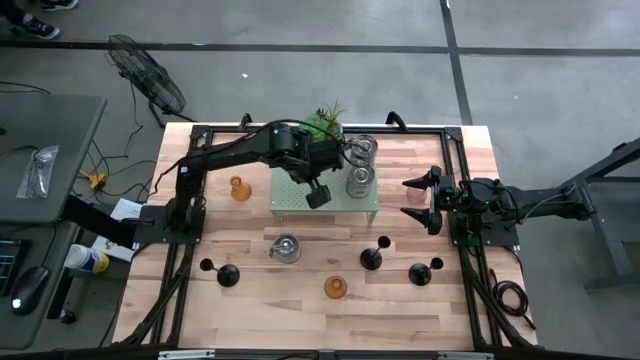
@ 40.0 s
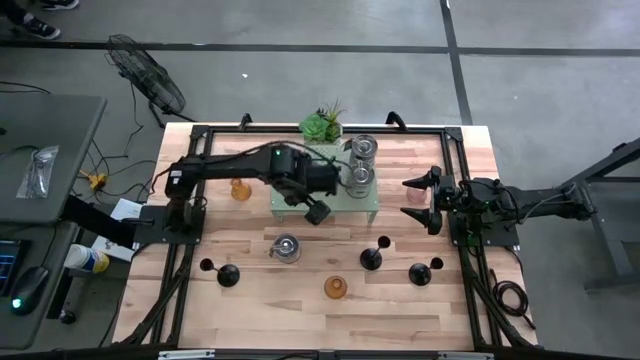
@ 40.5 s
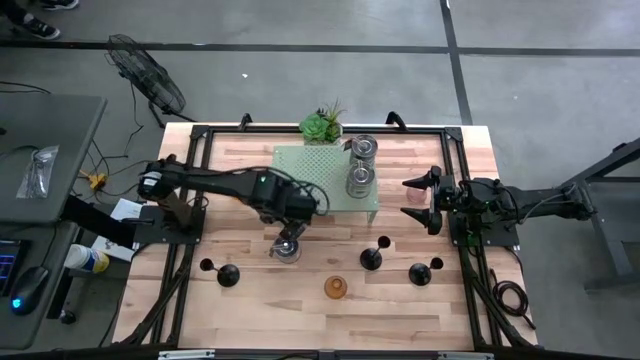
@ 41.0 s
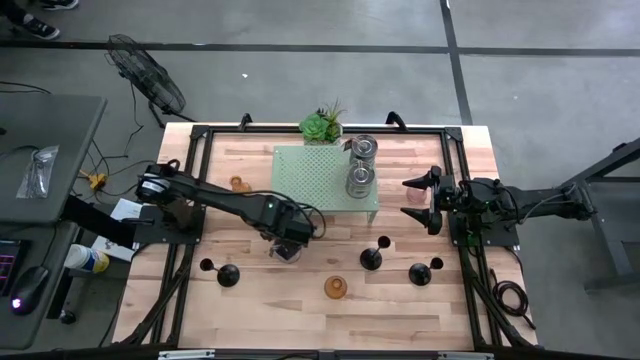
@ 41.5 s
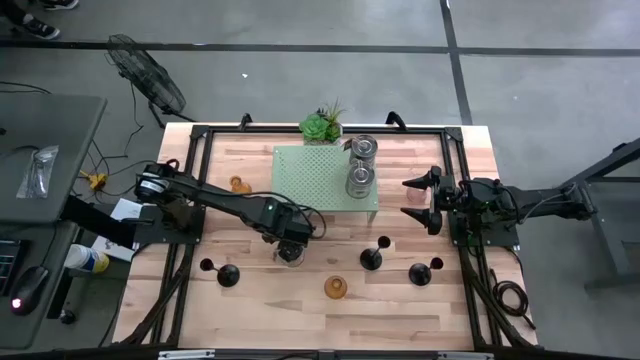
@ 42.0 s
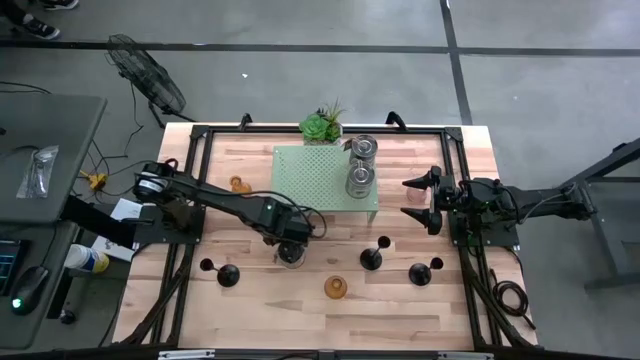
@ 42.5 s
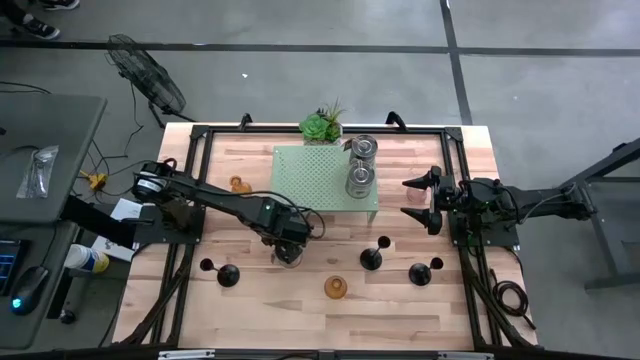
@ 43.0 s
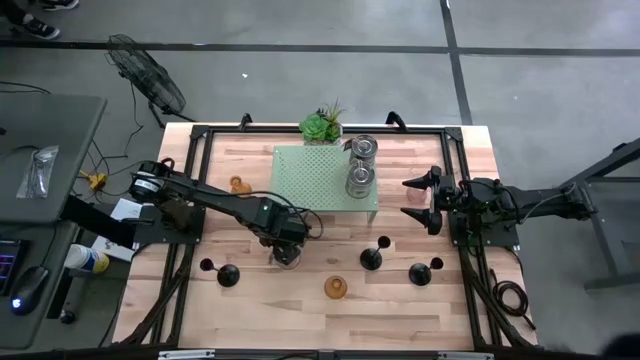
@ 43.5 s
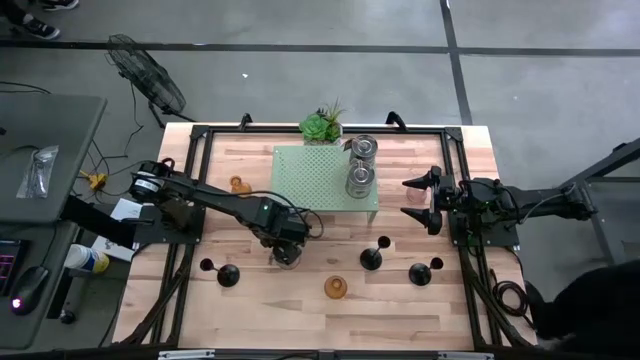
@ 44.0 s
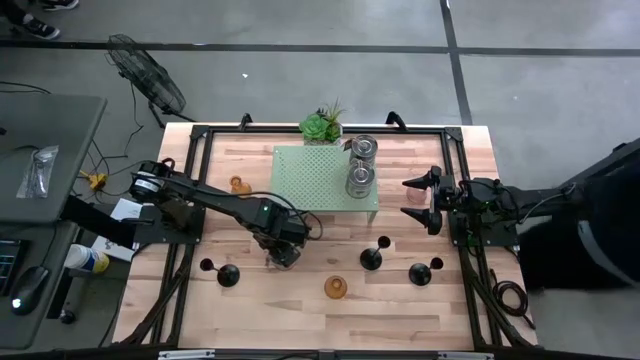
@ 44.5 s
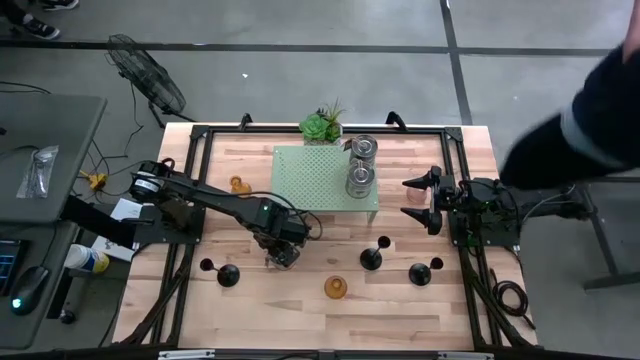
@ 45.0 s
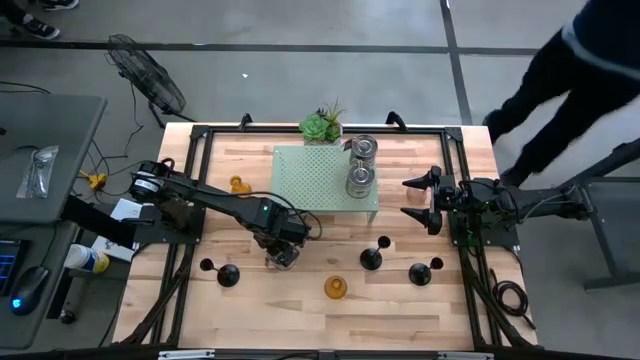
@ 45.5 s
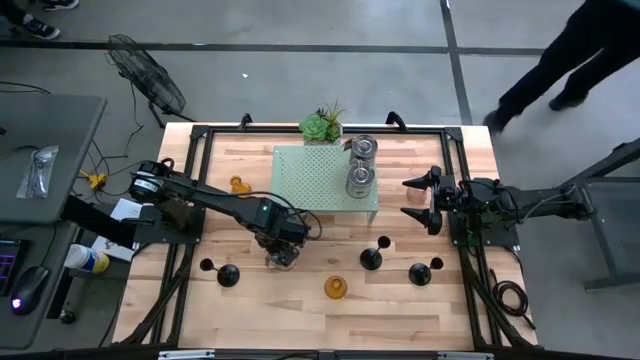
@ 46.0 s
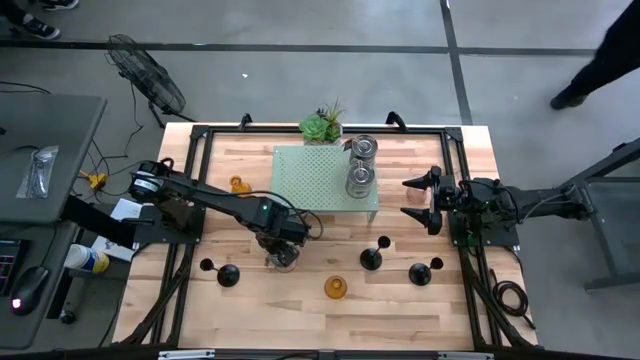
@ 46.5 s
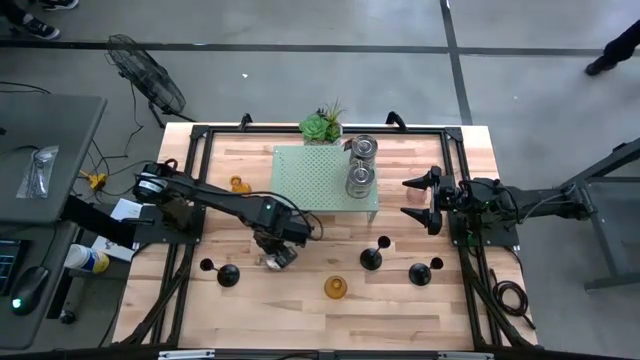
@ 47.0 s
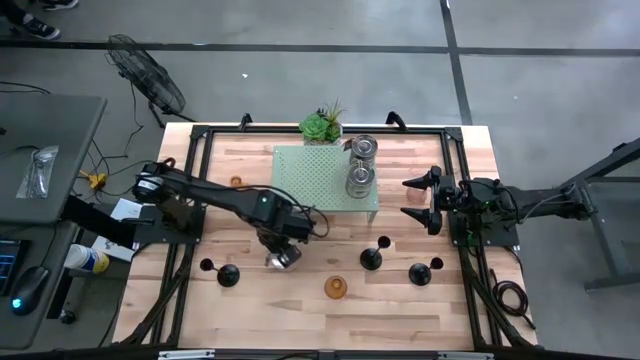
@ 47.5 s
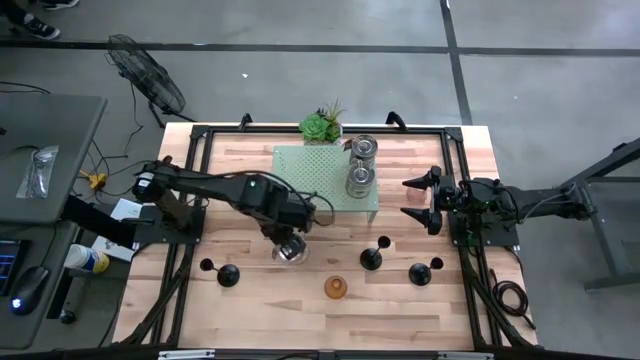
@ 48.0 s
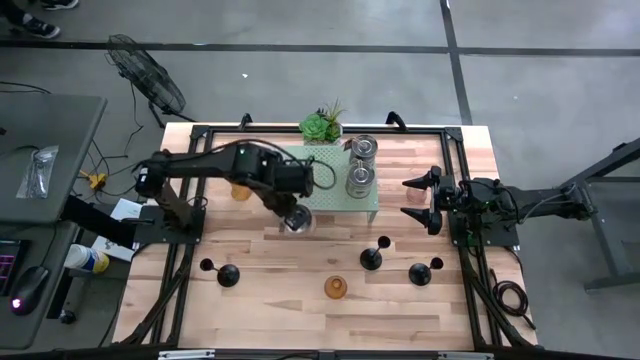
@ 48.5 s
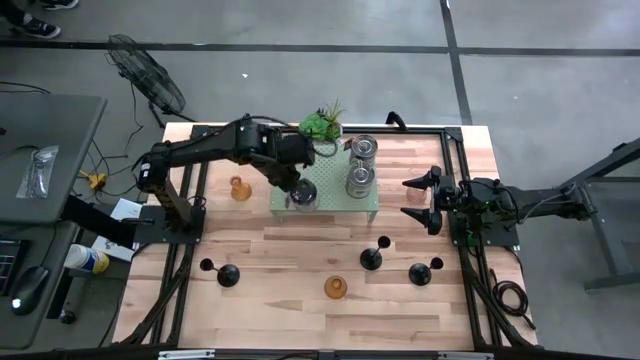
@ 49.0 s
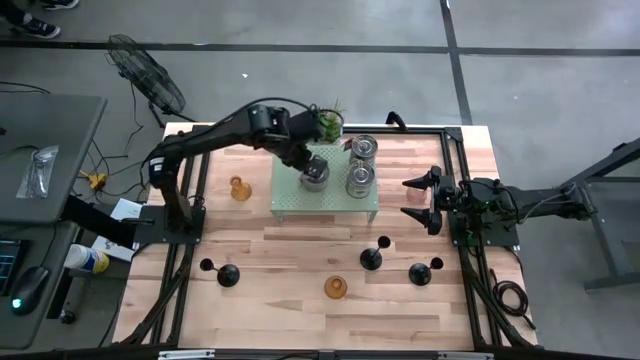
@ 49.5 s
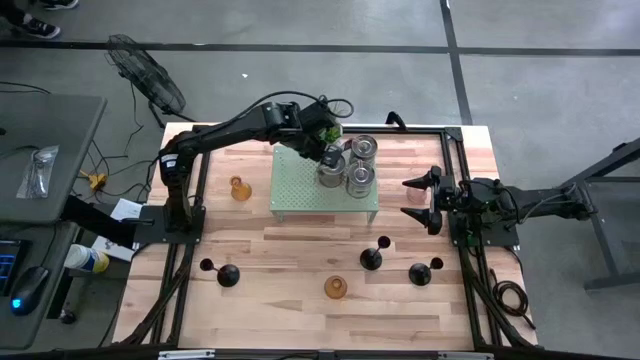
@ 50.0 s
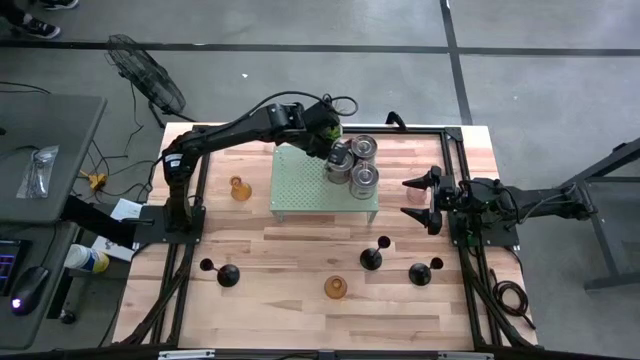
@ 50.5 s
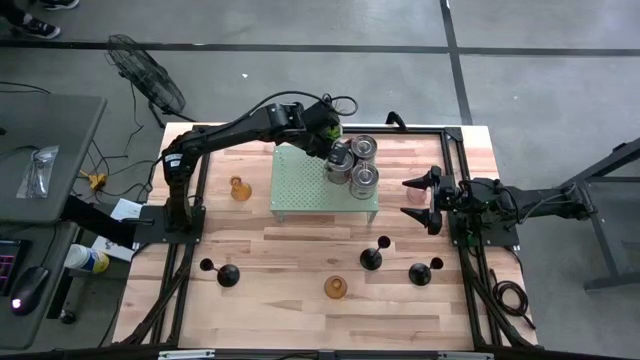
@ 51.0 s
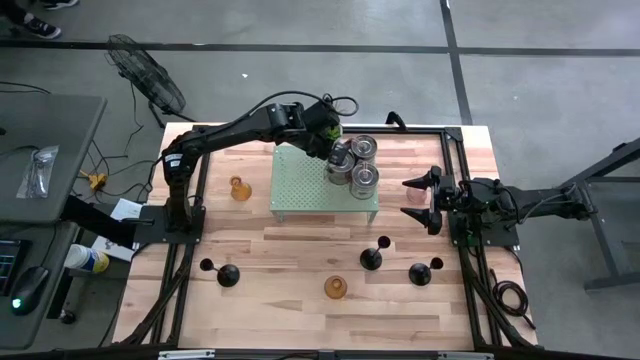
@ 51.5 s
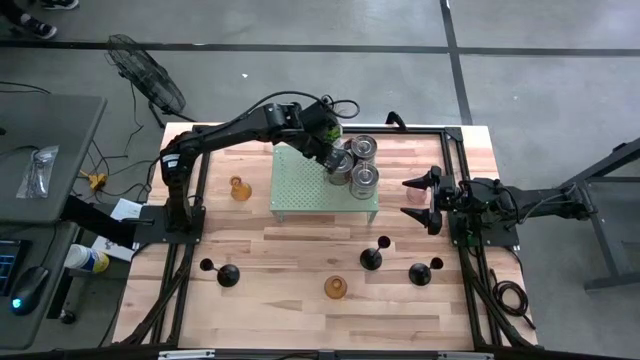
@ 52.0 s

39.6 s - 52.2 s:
Task: Pick & Place candle stick holders
Put the silver scented candle on the shelf

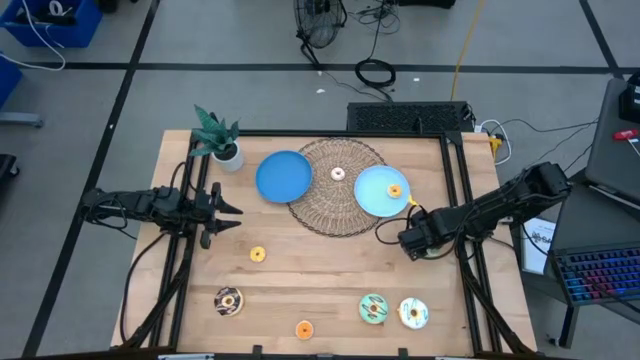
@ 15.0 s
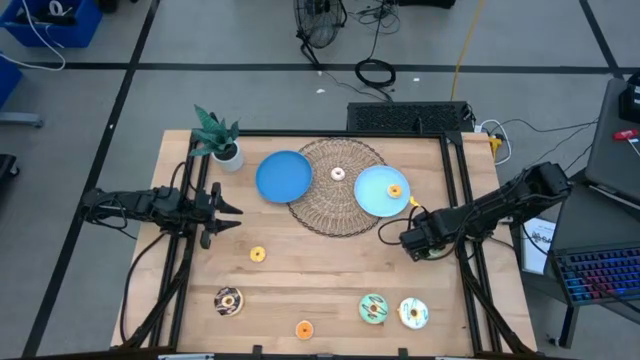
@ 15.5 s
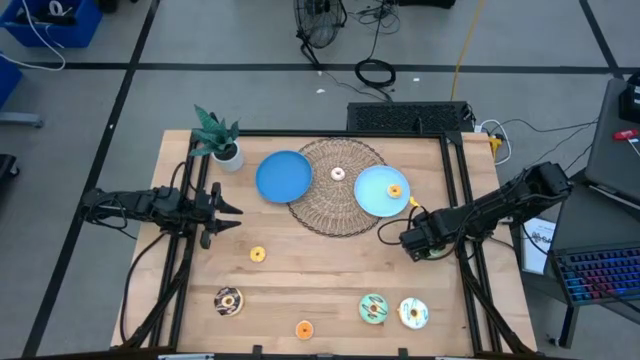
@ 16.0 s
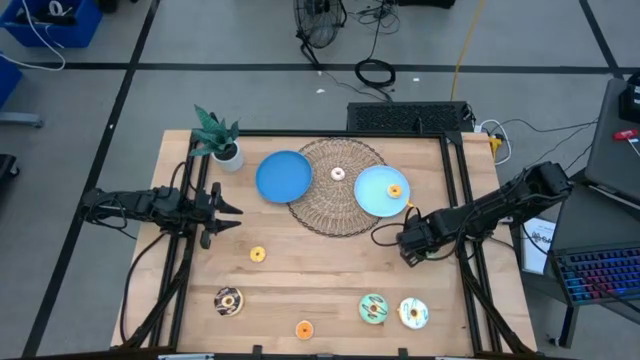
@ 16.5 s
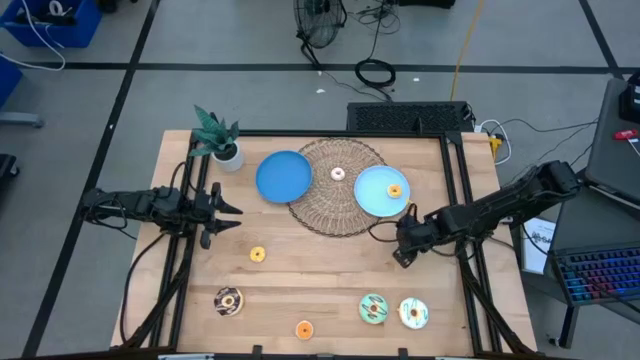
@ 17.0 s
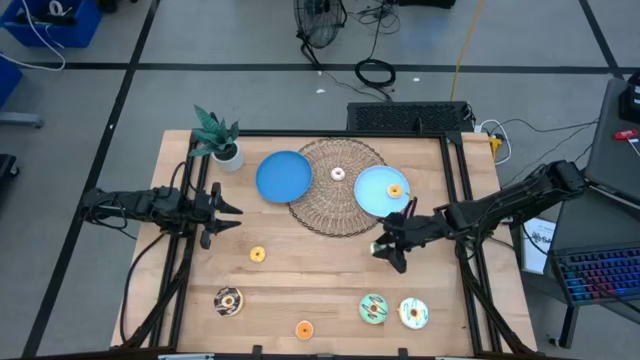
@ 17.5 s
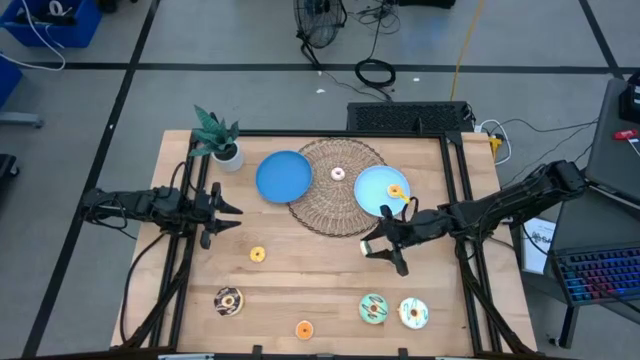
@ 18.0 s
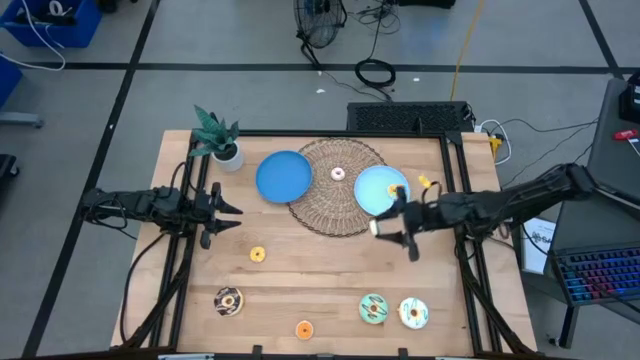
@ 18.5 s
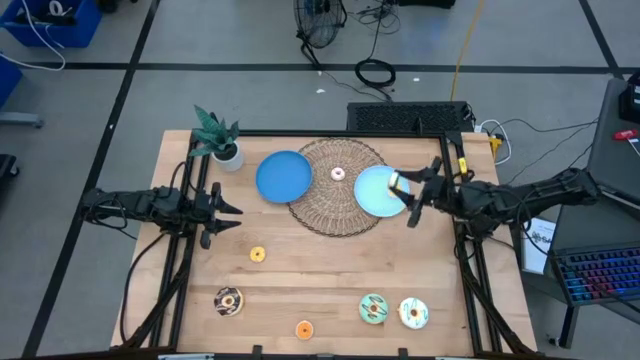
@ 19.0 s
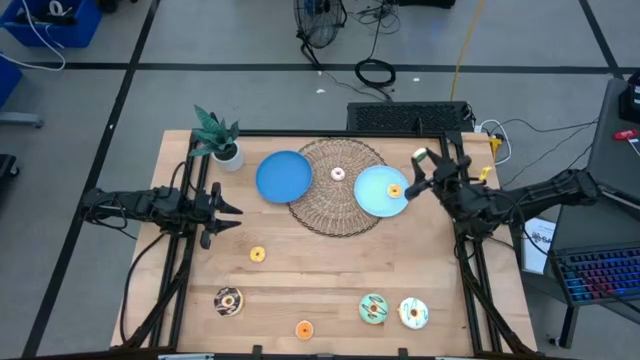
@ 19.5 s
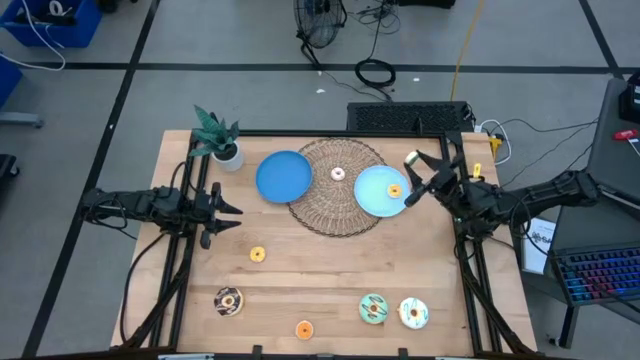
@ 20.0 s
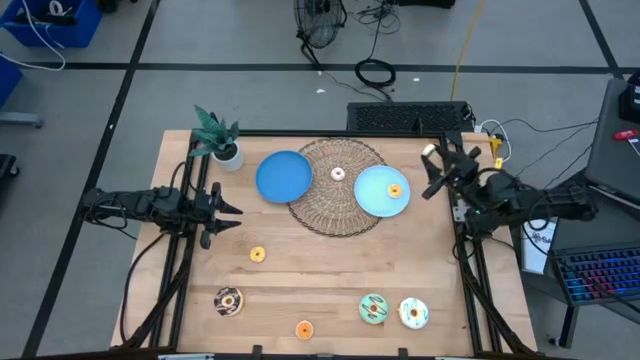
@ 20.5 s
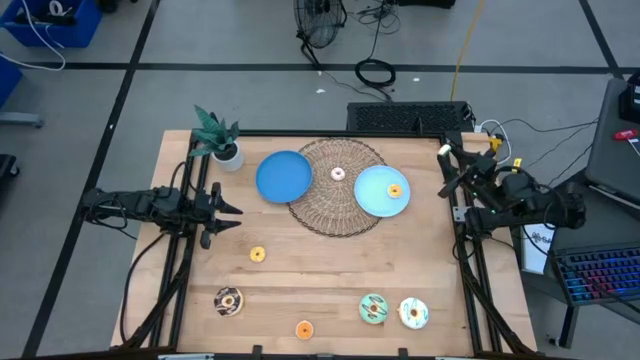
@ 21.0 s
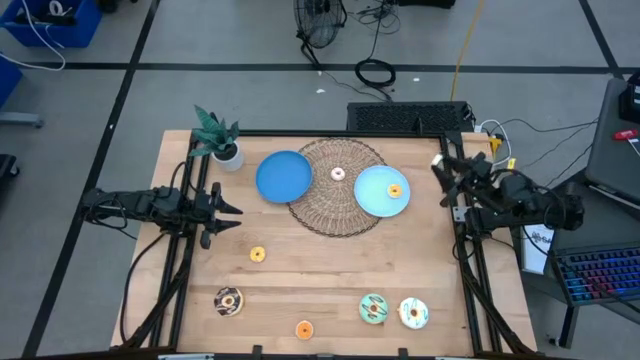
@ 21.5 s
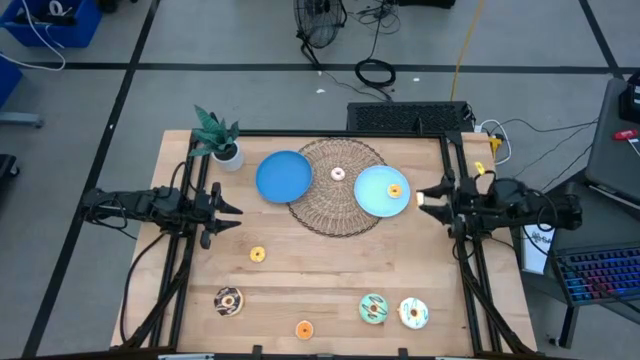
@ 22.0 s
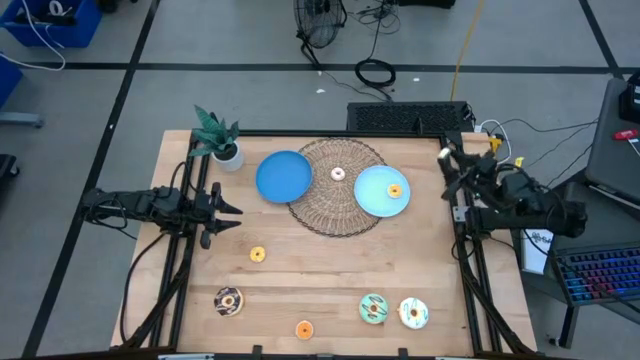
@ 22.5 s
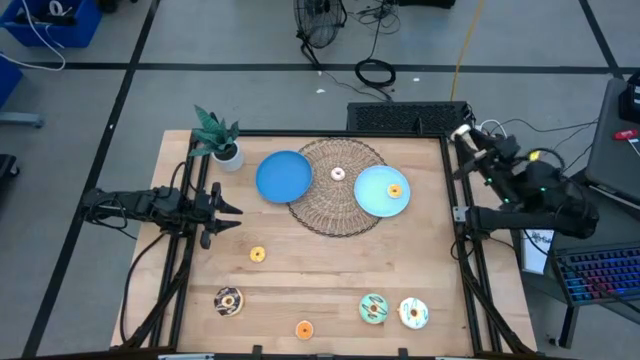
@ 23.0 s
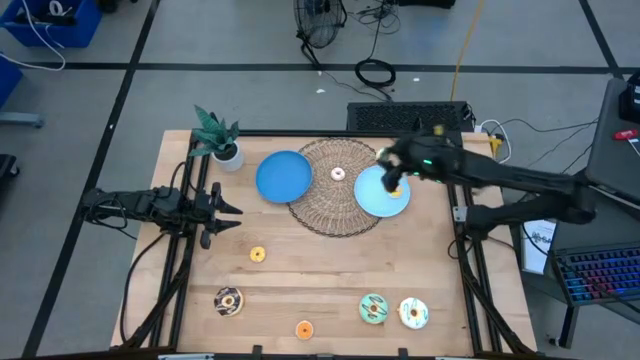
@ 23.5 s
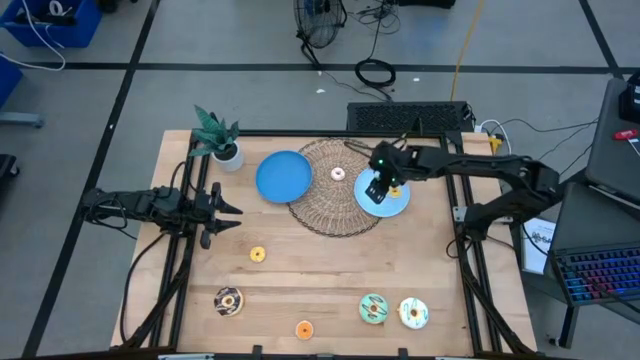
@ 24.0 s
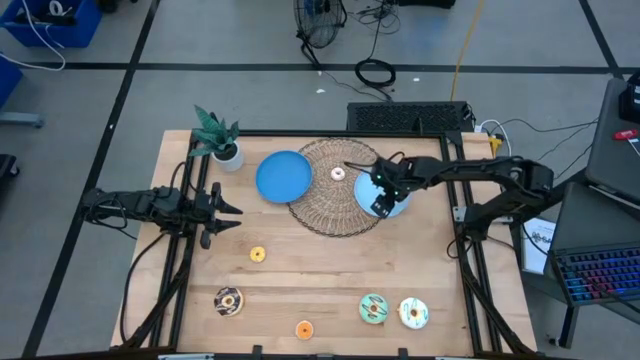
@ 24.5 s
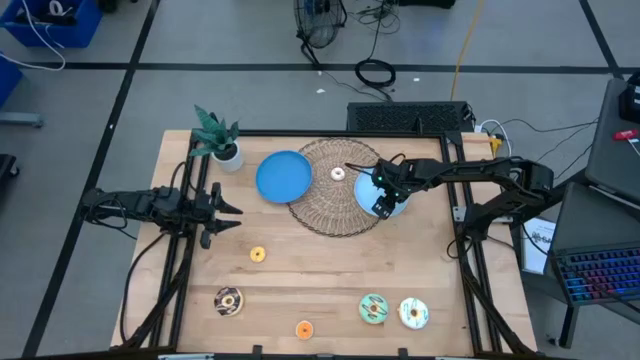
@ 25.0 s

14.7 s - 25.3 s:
Task: Pick & Place donuts
Put the small green donut on the light blue plate
